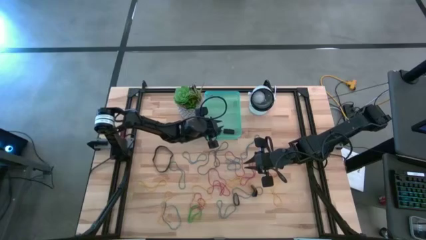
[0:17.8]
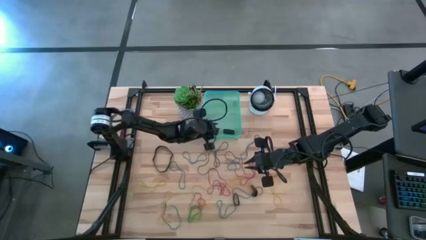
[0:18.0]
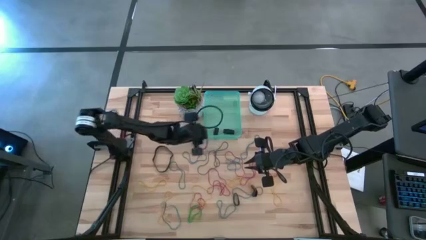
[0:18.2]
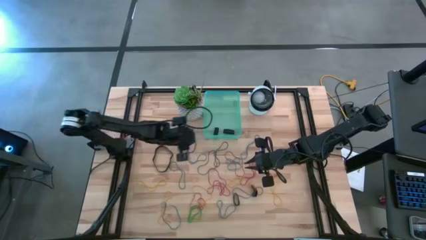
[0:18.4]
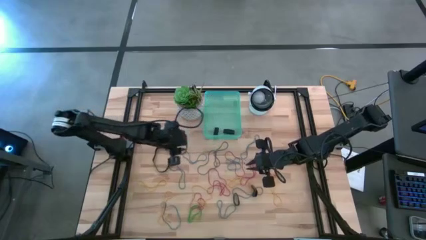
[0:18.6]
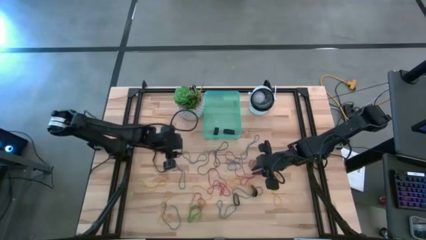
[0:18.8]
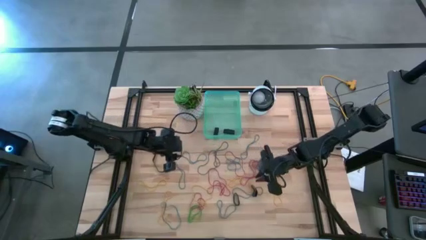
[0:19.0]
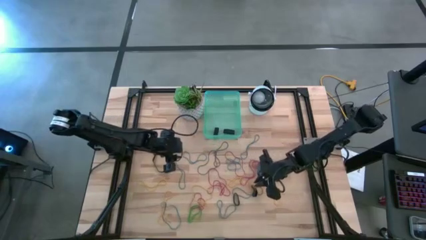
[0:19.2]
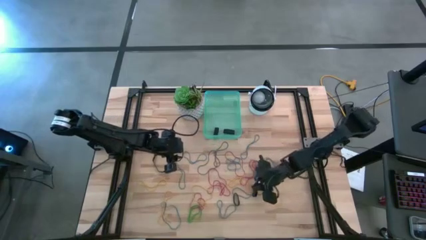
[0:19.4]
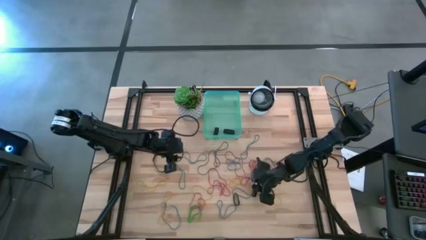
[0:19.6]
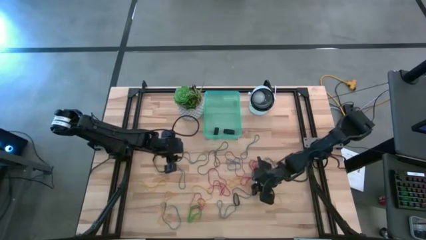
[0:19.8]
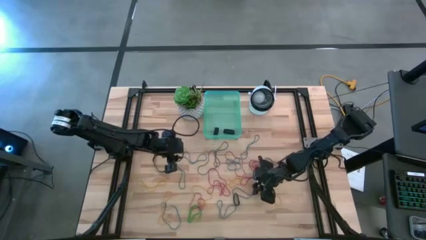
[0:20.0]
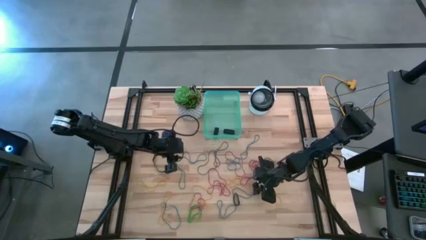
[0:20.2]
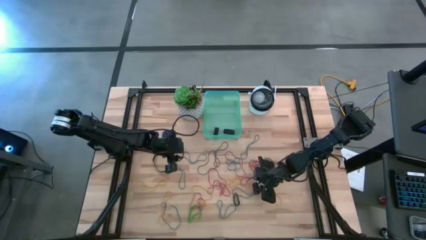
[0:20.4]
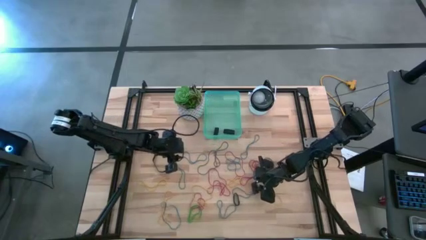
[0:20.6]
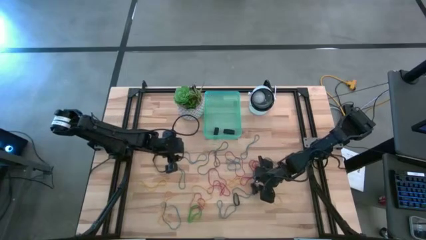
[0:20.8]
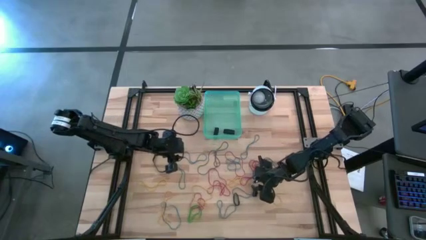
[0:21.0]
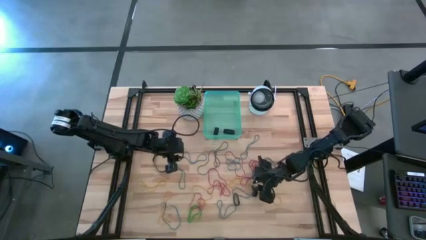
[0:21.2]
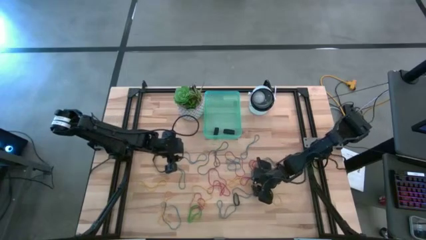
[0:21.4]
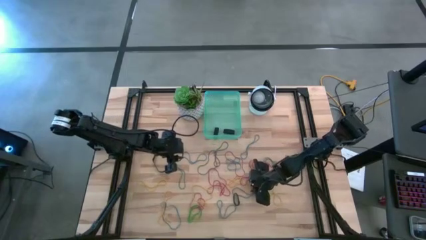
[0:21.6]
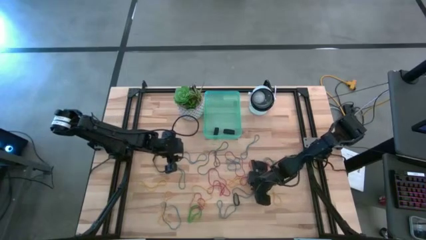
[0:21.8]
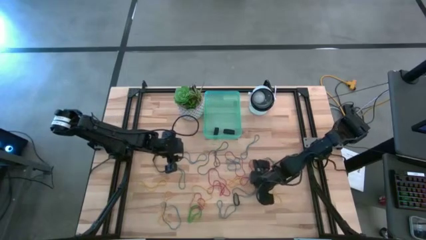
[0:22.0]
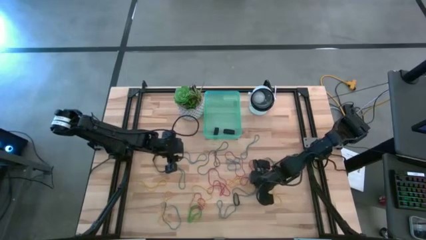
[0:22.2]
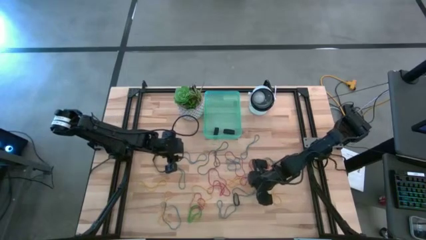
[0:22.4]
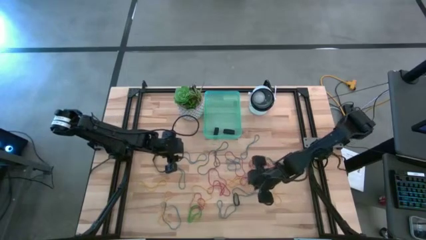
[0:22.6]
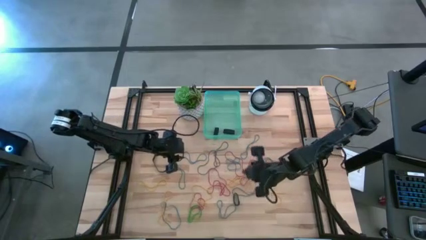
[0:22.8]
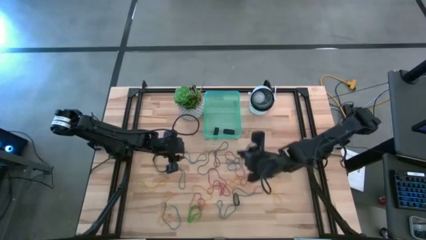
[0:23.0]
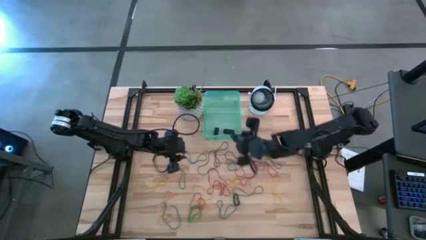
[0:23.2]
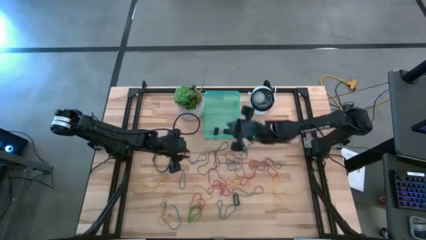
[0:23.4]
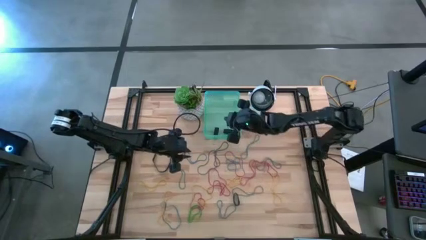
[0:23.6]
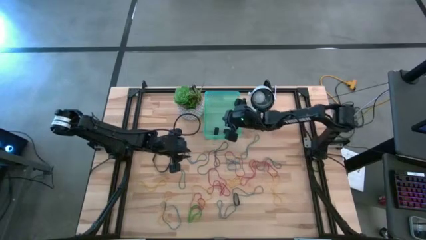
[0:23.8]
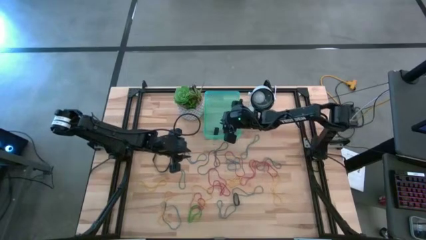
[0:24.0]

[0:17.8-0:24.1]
Task: Pick and place rubber bands into bin
Put the black rubber band into the green bin

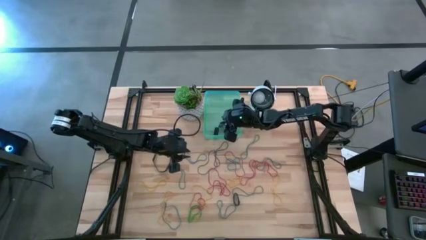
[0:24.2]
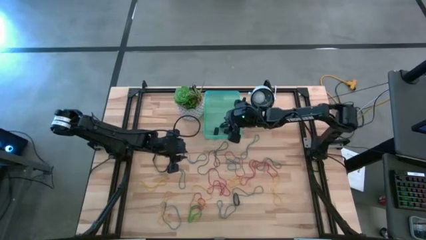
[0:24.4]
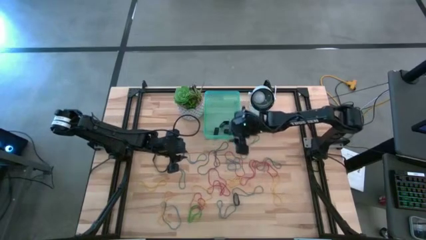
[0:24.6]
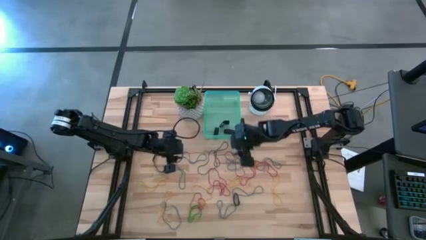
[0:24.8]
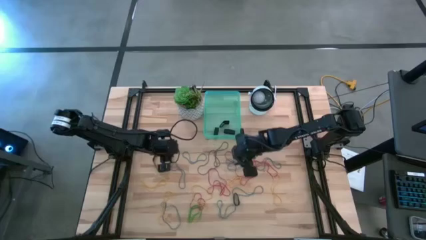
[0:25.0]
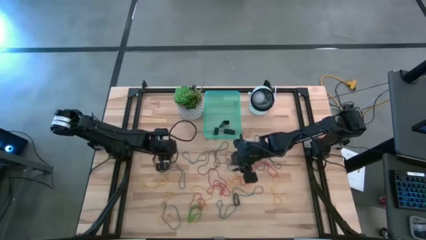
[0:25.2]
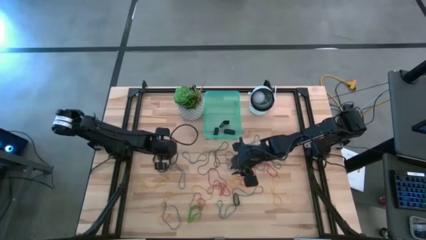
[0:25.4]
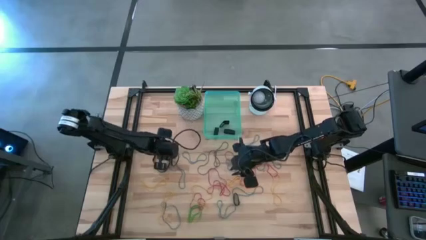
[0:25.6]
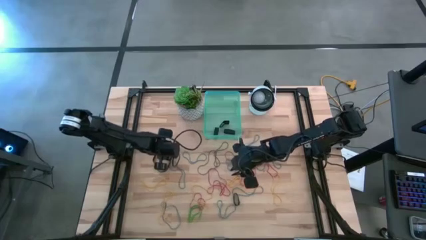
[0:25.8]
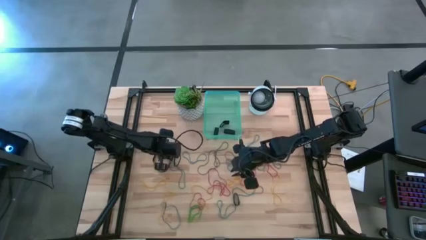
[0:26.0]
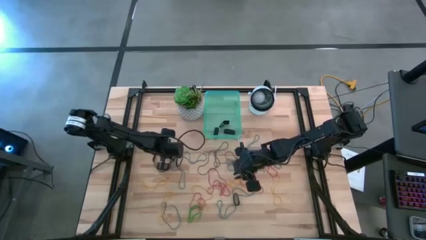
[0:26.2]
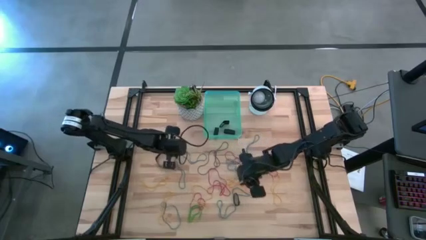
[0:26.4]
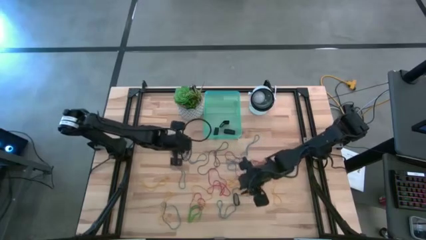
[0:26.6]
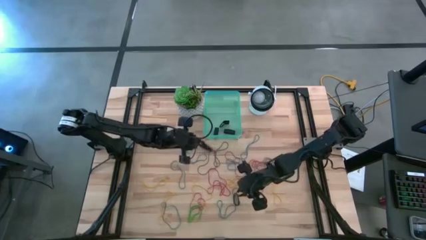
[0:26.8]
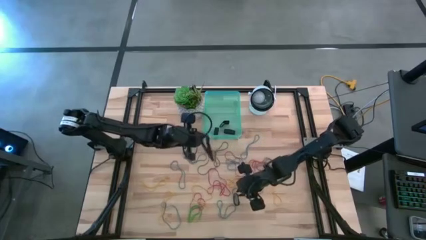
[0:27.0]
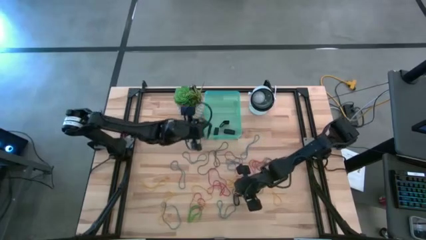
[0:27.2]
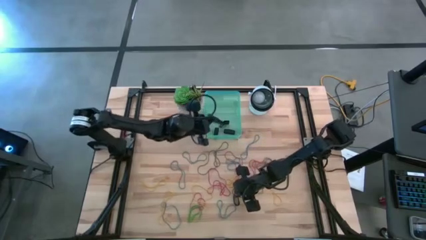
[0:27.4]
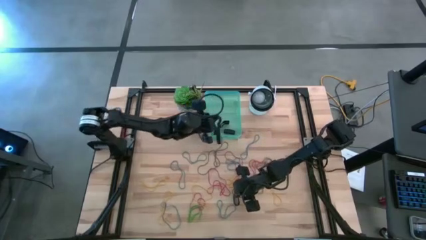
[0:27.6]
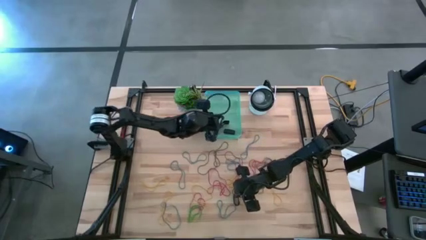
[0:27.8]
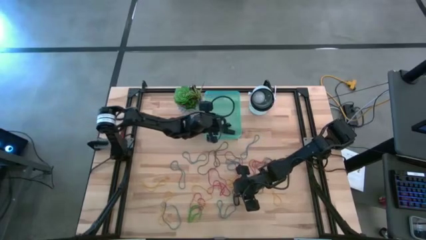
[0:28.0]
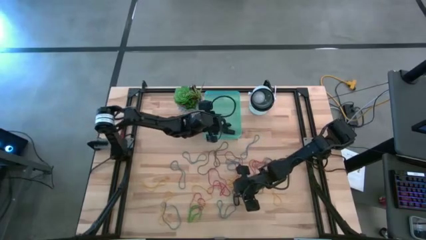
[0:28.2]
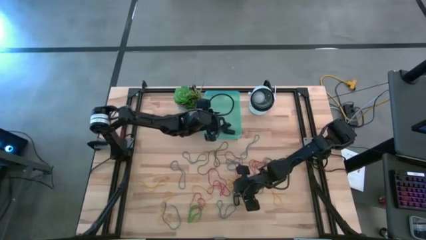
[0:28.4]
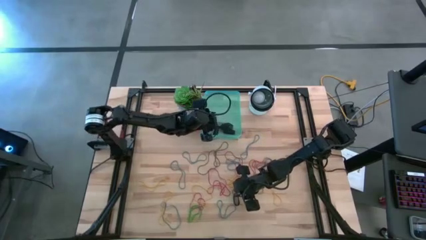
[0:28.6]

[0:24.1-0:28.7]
Put the black rubber band into the green bin

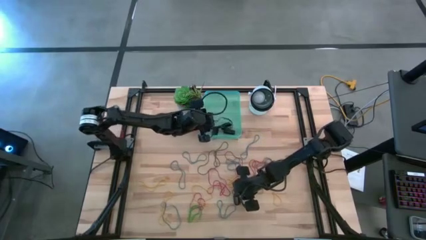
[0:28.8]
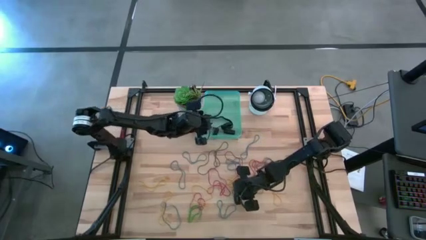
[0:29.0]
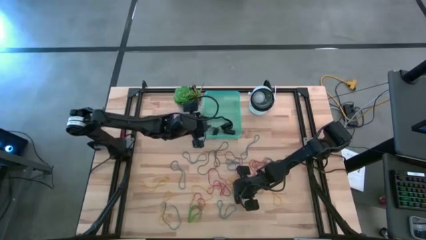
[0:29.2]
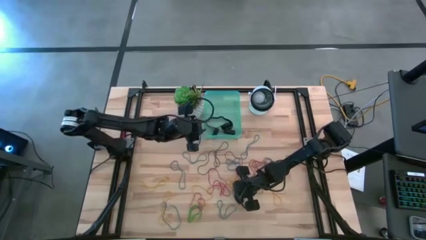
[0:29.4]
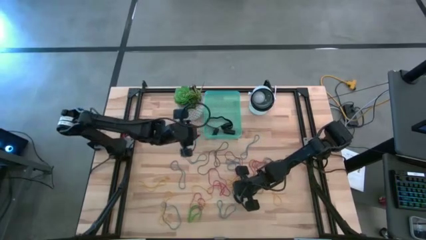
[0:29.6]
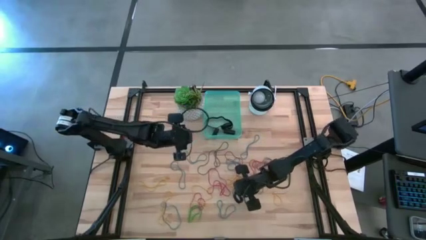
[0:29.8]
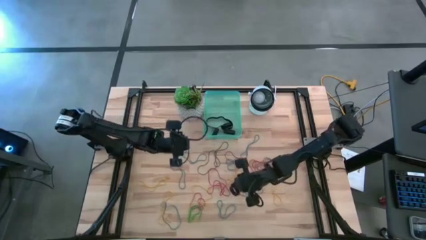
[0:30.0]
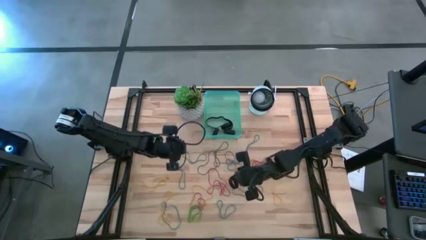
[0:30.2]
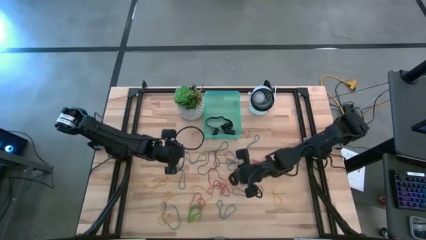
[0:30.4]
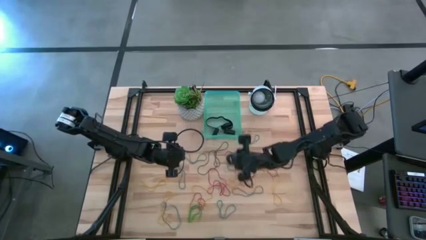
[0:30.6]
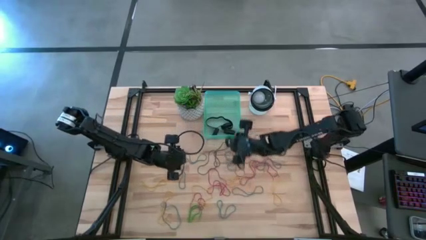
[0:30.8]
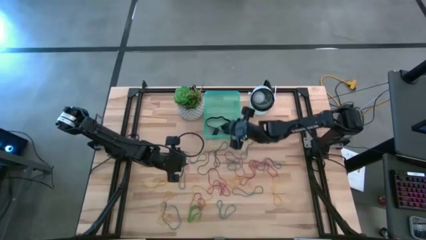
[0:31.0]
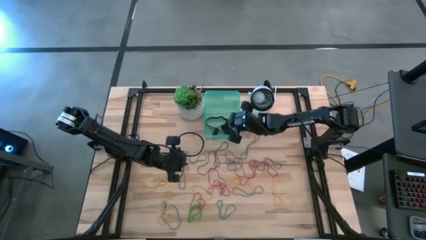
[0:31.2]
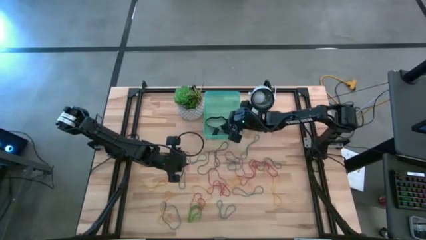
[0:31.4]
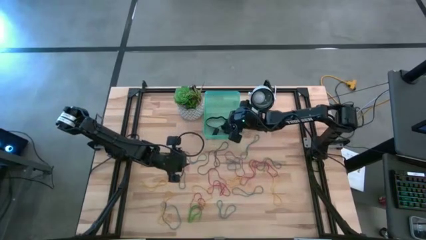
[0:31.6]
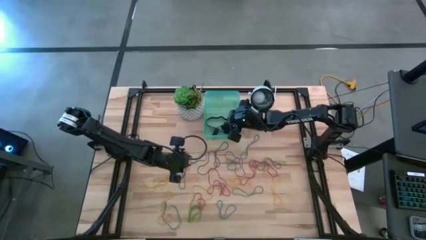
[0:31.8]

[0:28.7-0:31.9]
Put the black rubber band into the green bin

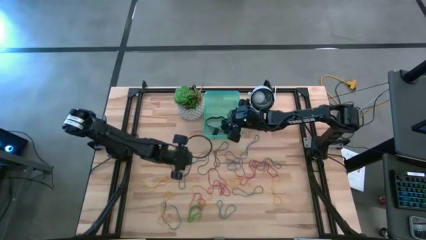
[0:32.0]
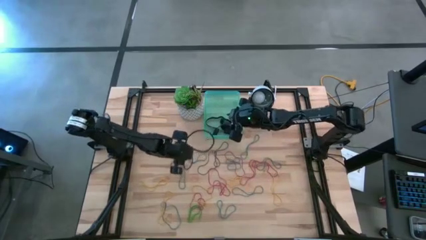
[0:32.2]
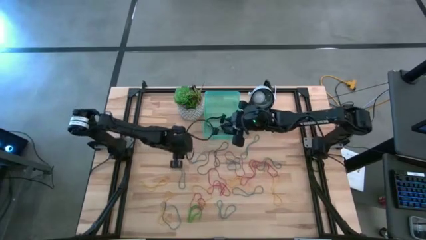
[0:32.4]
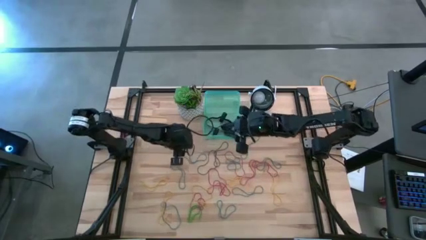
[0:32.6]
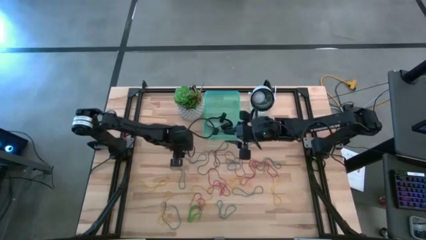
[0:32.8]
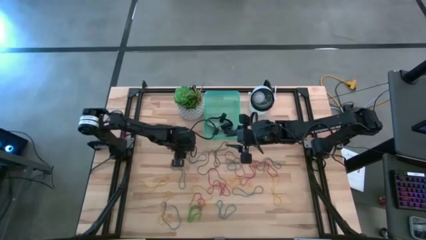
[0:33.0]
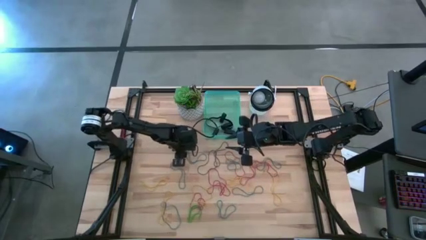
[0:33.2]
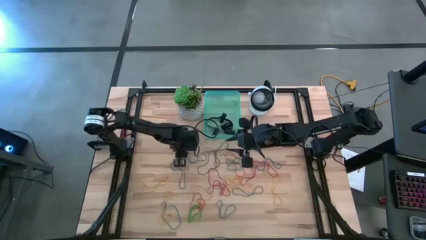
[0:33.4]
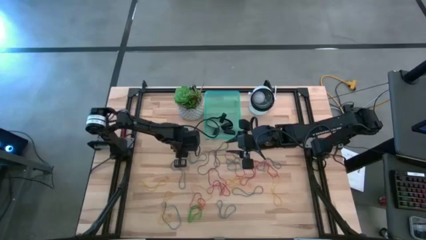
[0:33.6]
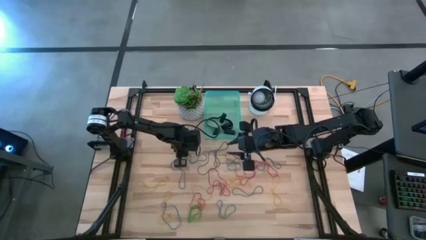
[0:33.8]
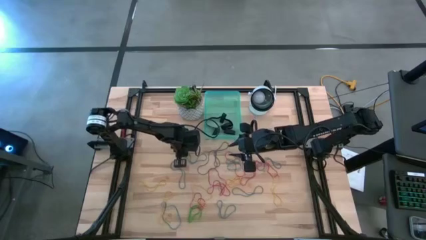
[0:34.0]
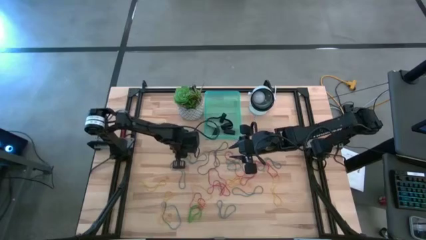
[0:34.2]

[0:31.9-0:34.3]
Put the blue rubber band into the green bin
